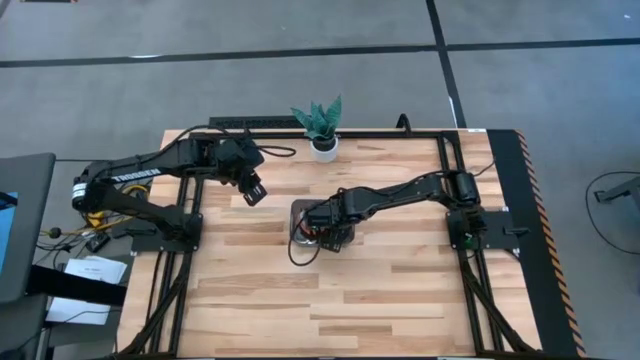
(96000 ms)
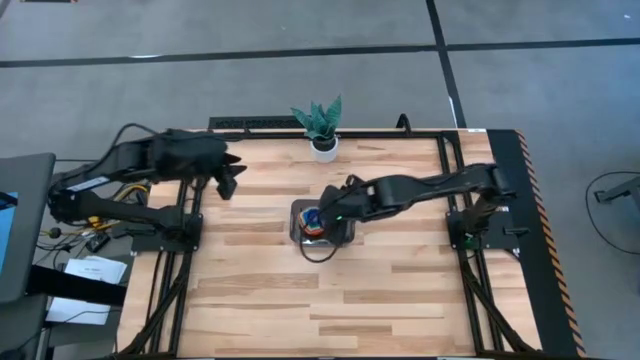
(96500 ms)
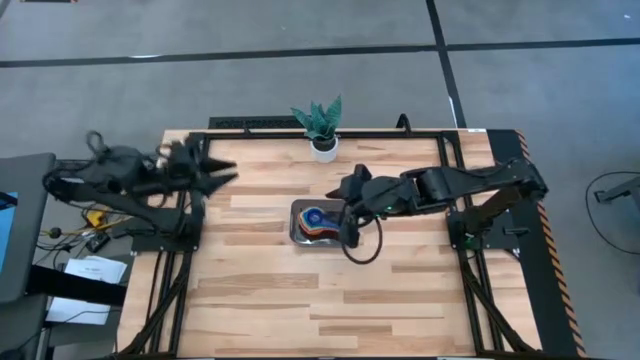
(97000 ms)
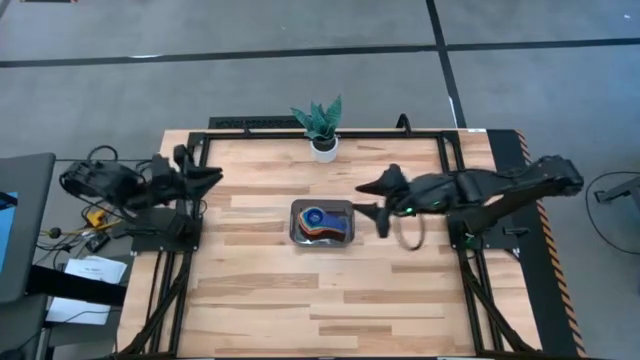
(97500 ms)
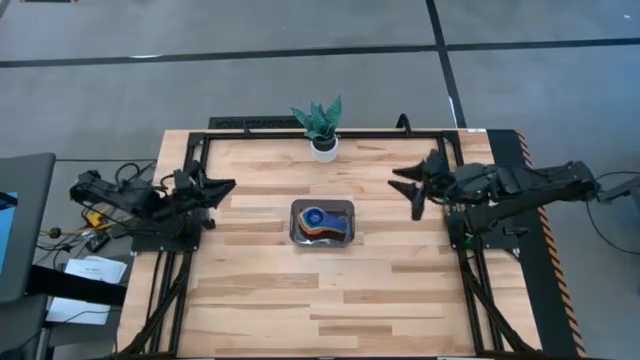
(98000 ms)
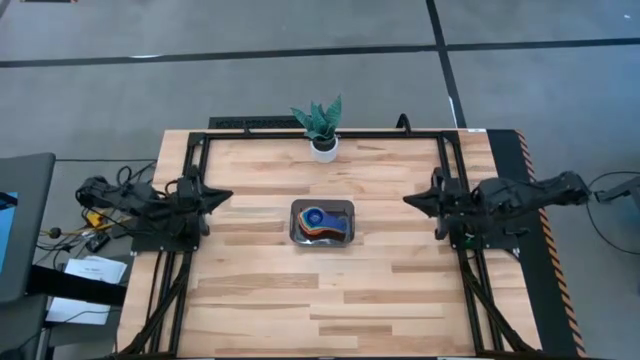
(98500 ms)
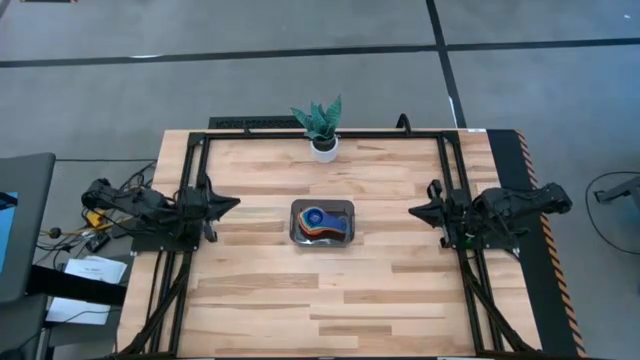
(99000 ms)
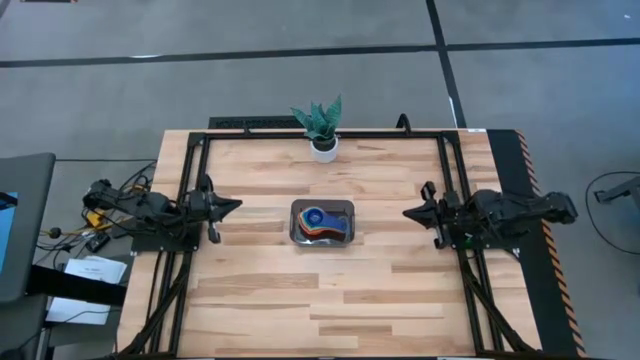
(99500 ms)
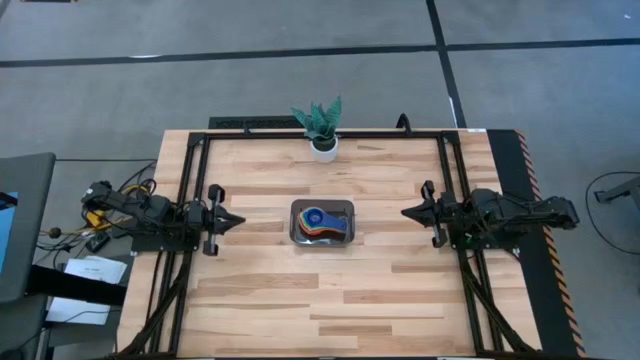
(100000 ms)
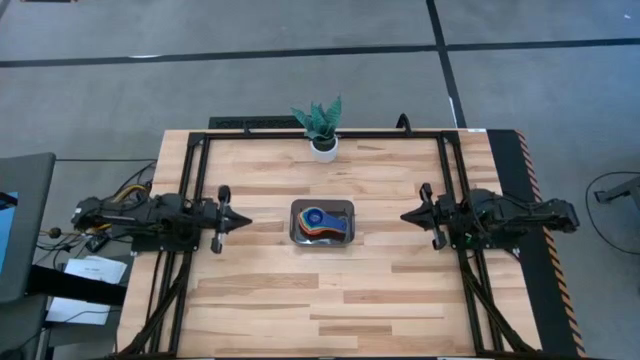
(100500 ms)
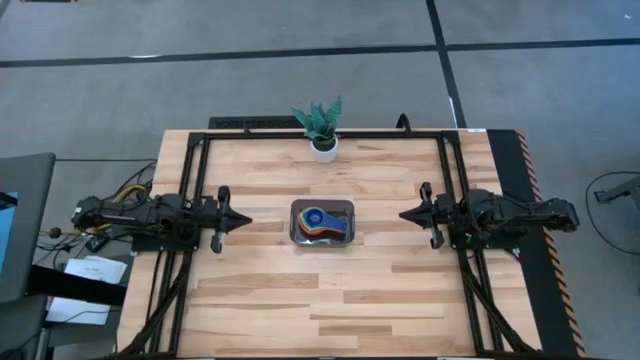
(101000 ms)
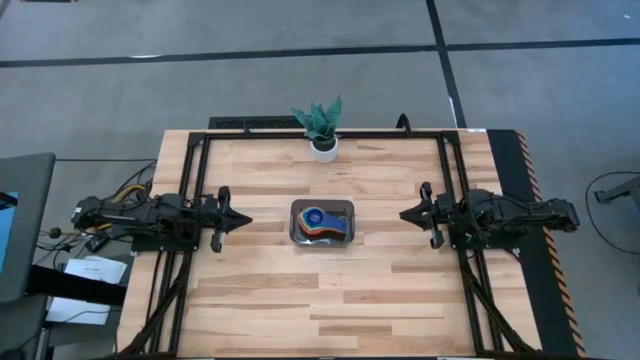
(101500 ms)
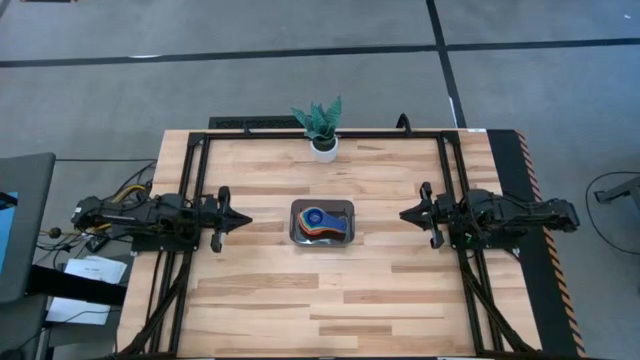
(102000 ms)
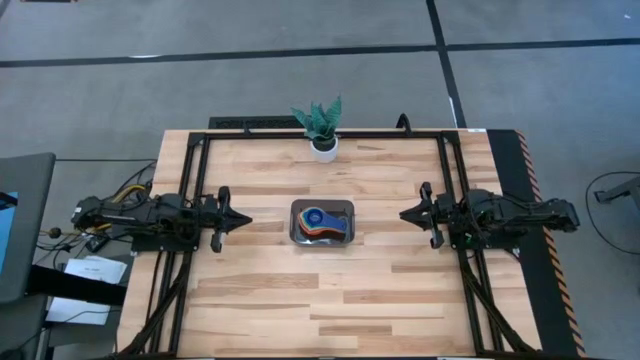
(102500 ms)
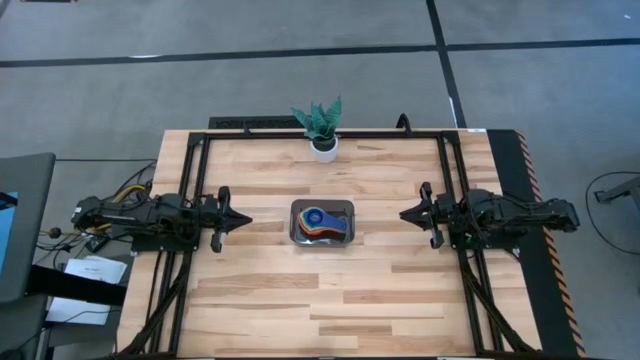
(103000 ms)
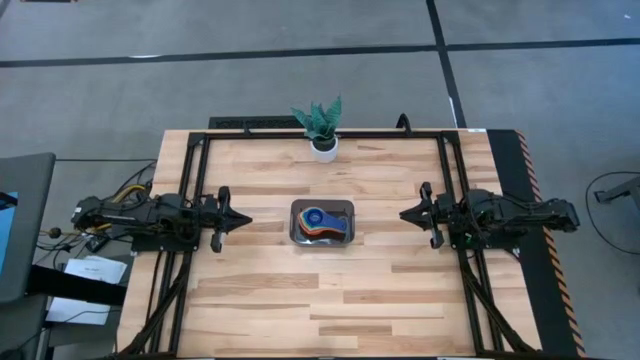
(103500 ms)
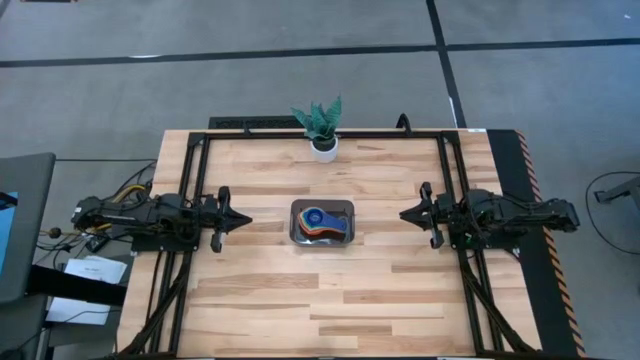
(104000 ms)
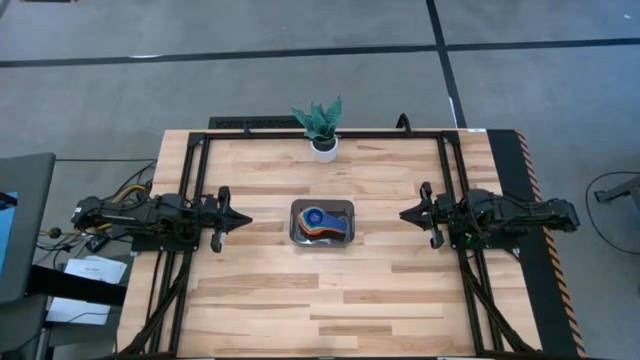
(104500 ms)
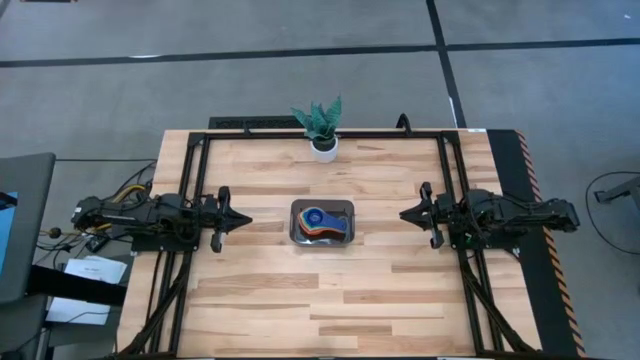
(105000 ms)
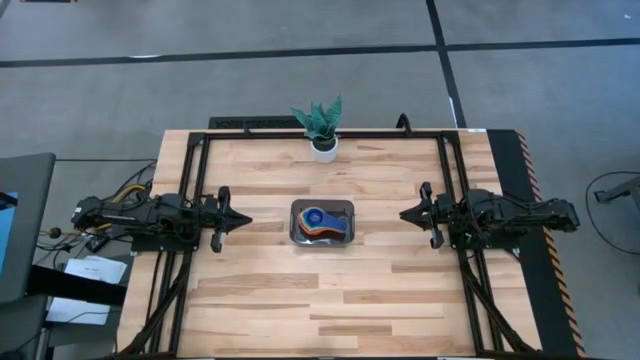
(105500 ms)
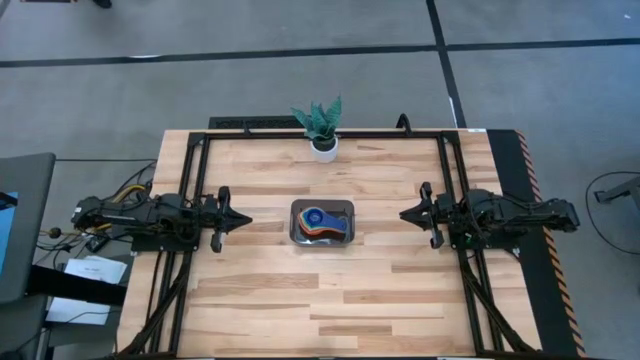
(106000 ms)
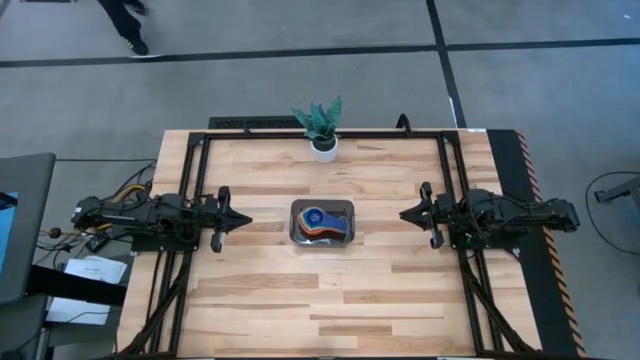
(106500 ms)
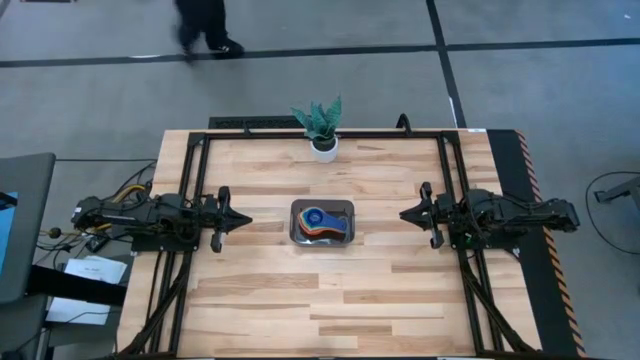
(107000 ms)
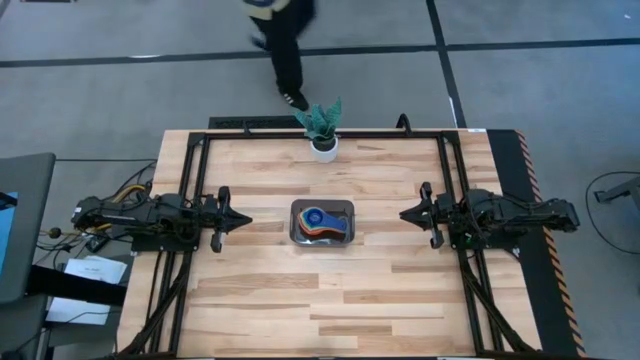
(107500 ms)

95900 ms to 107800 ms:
Task: Nest measuring cups in basket
Return to Home Position
